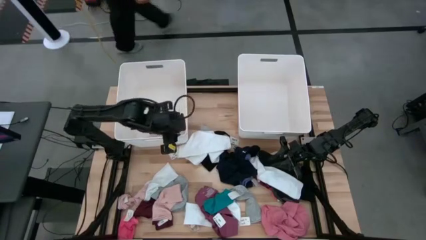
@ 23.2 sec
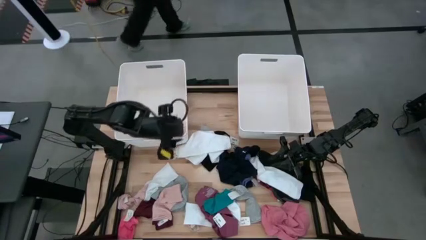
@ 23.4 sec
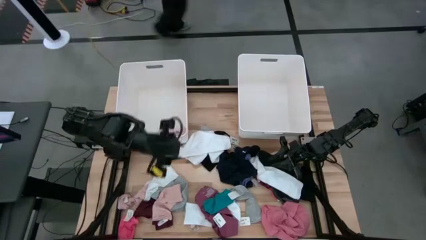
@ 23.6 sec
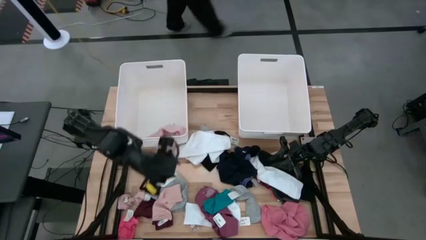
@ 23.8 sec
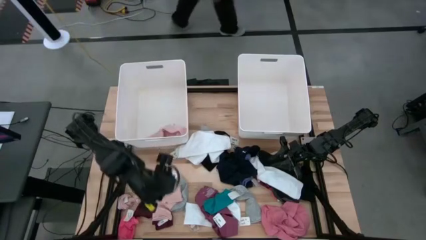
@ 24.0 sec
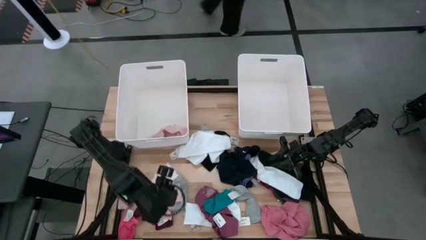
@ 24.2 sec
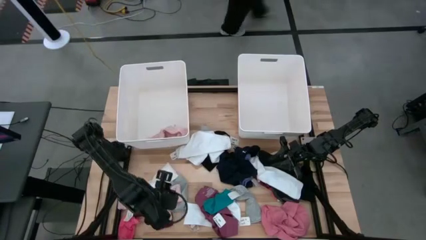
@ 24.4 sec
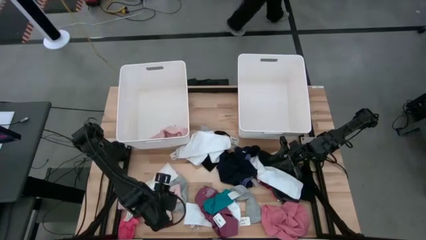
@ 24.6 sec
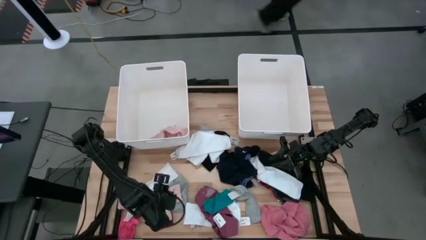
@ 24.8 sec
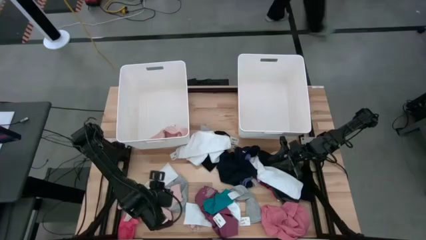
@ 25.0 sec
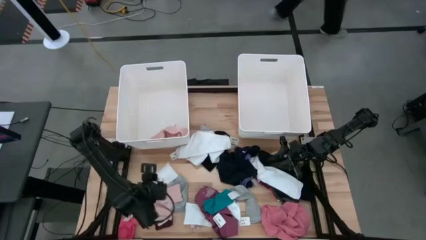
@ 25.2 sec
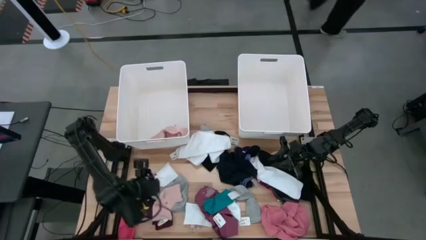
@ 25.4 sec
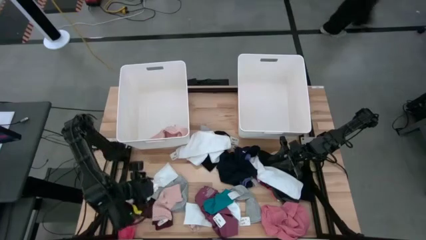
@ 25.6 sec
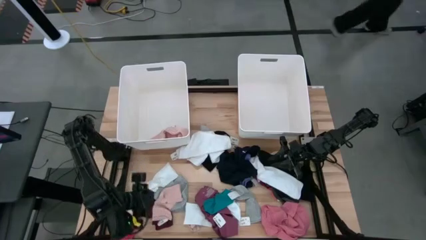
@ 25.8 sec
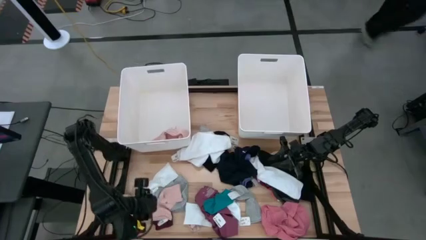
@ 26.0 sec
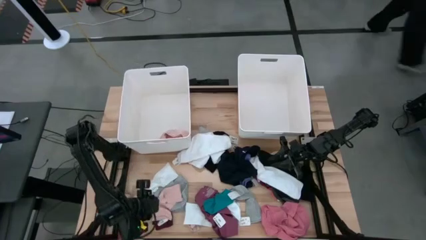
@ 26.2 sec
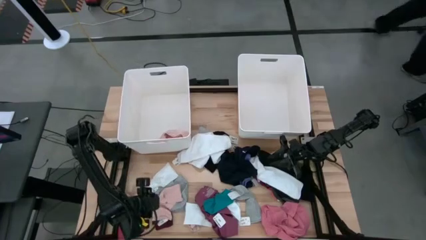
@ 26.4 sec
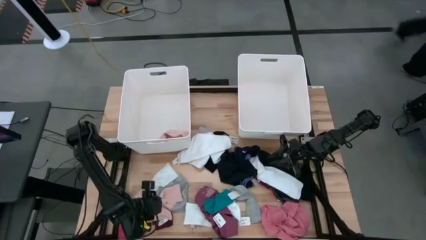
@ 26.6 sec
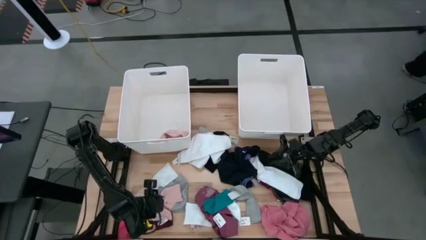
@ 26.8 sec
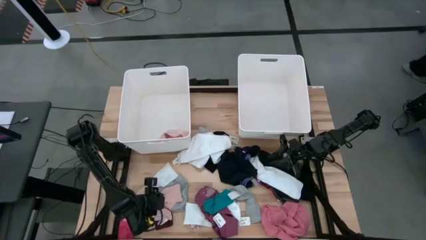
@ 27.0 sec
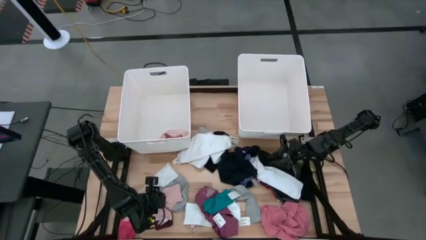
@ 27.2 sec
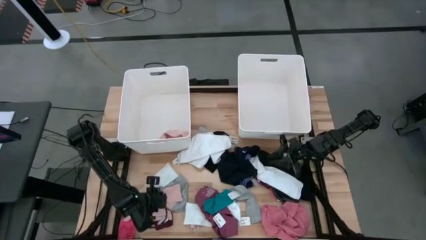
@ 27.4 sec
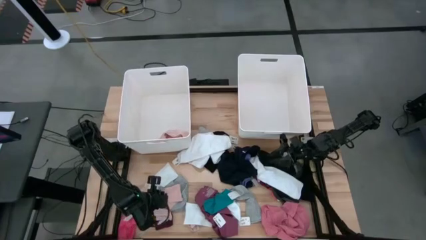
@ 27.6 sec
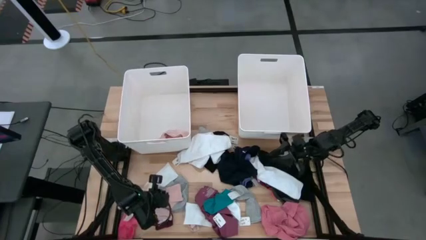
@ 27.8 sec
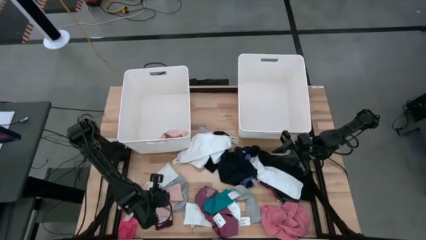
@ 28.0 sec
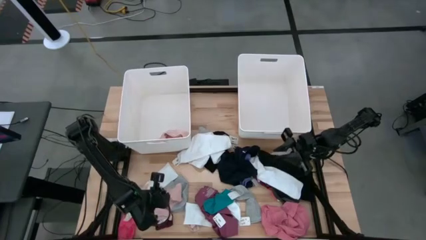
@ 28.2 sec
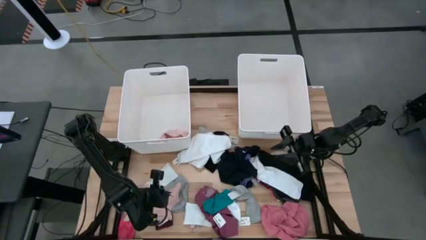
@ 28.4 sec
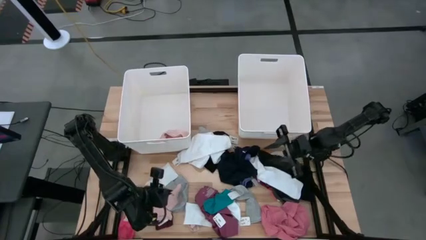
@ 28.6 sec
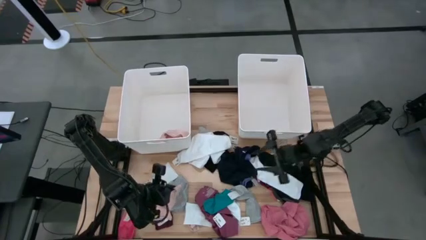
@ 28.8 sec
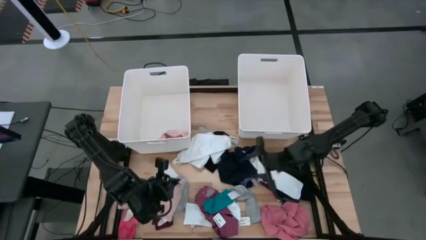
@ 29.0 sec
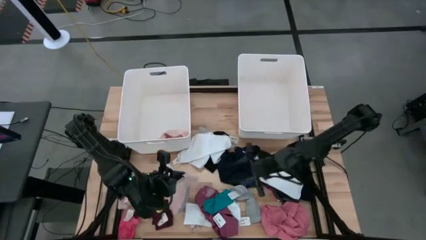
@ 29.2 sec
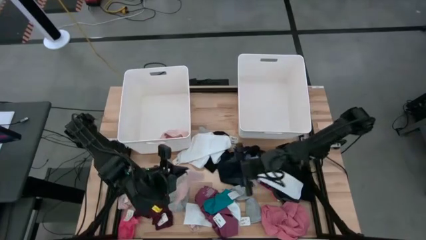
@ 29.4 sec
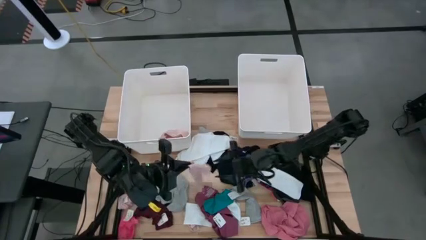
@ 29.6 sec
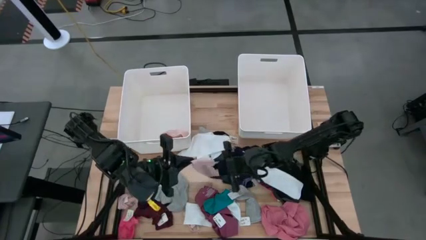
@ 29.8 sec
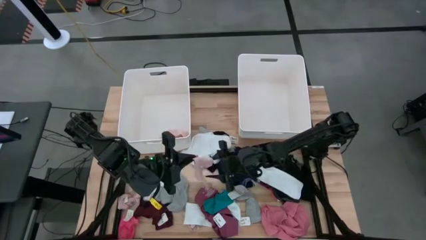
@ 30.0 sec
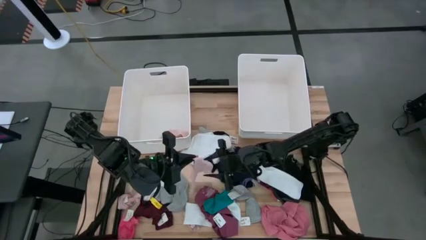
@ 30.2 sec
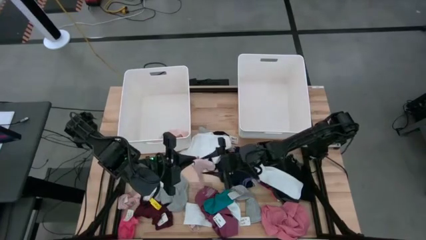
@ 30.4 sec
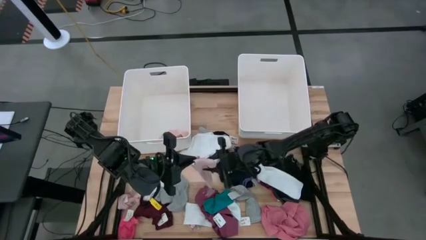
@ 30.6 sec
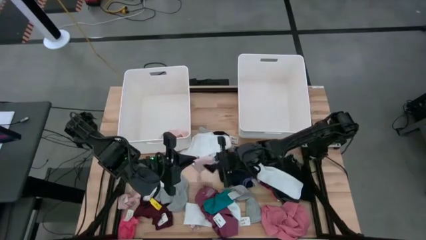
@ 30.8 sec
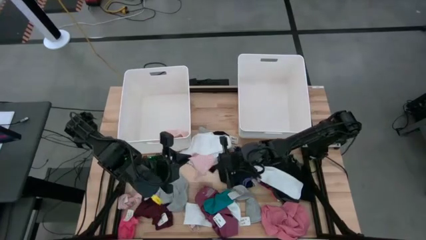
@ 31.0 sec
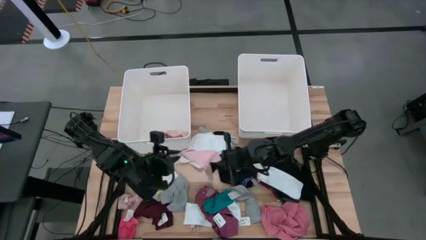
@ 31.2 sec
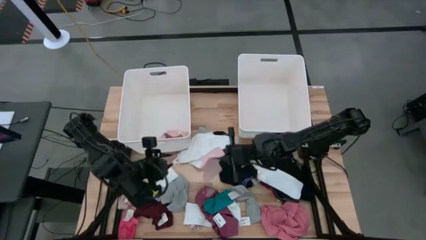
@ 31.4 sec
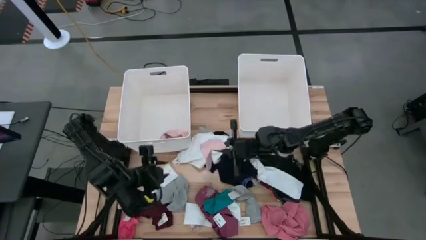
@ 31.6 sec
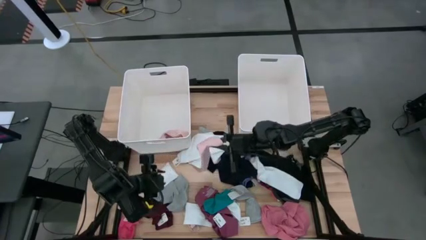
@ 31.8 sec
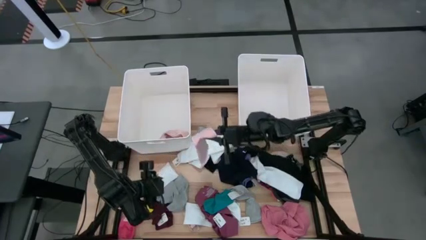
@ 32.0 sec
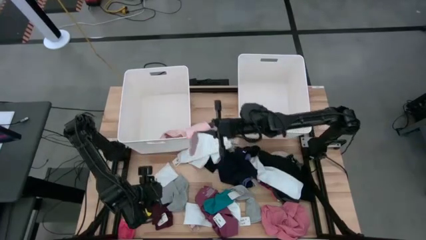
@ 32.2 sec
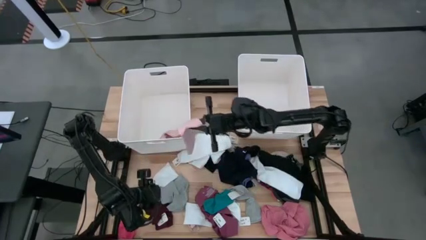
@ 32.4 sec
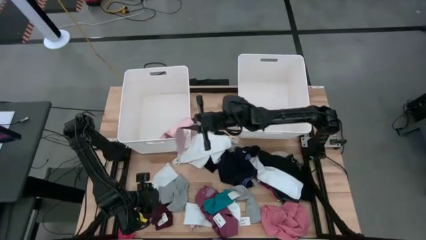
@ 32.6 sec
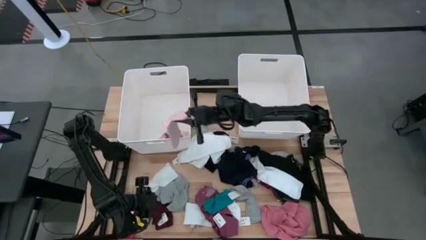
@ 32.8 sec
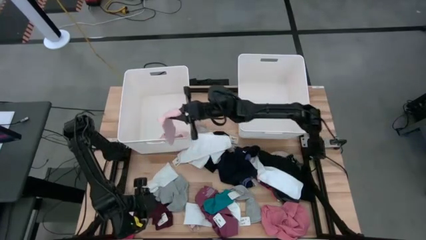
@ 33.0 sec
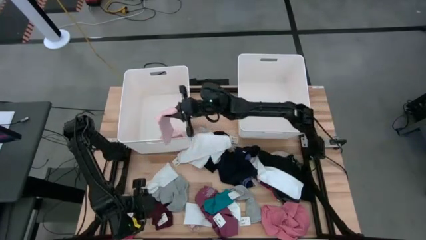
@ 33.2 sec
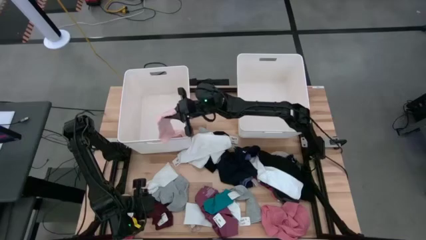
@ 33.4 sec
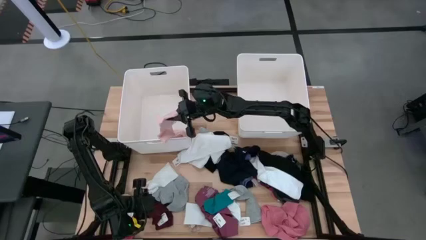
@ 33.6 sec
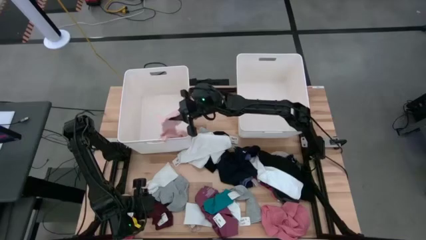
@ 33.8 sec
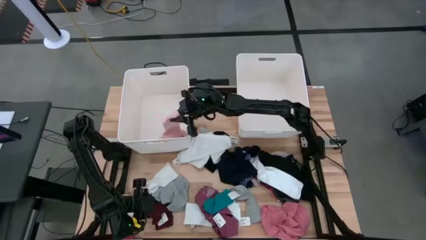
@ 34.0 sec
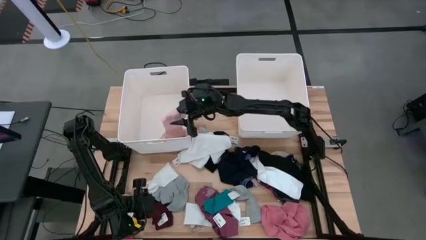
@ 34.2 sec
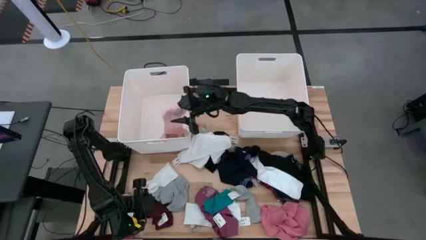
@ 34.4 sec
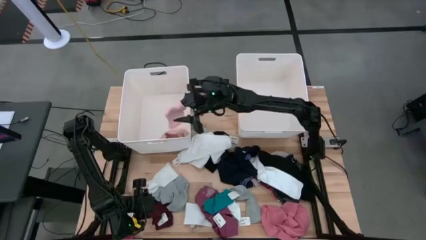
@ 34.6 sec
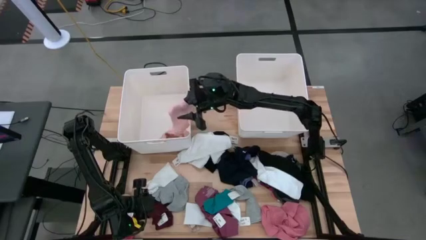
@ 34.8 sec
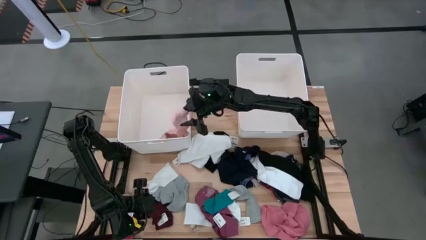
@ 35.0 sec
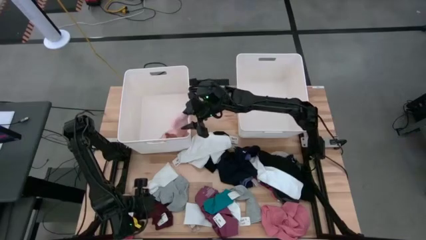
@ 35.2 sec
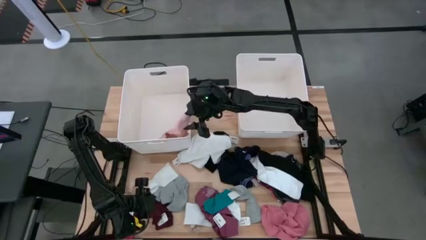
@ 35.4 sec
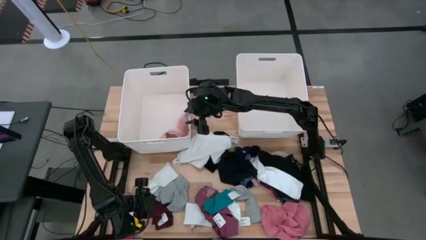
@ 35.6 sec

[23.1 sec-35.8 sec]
Task: Sort clothes
Put the light pink sock into the left white bin
